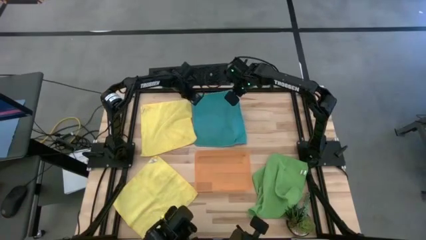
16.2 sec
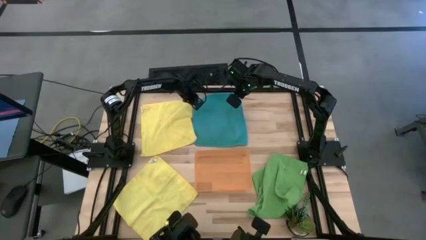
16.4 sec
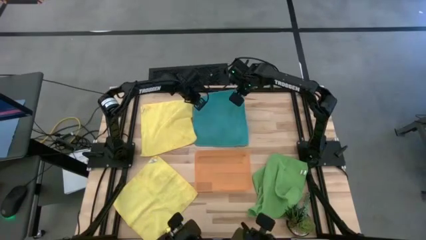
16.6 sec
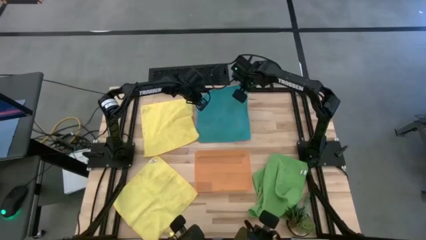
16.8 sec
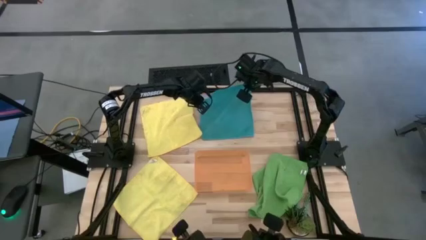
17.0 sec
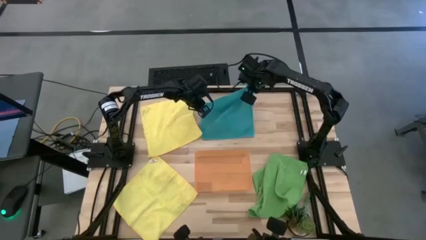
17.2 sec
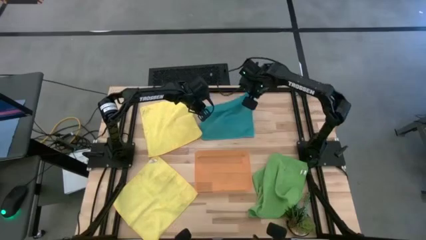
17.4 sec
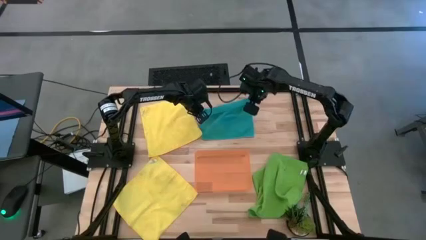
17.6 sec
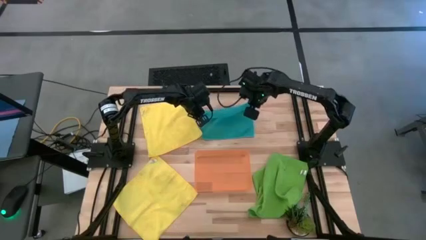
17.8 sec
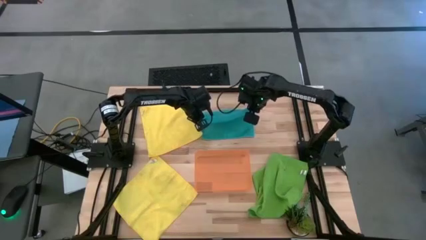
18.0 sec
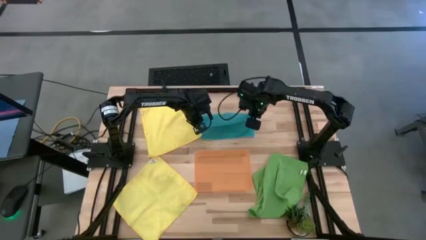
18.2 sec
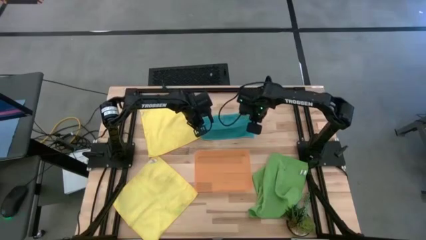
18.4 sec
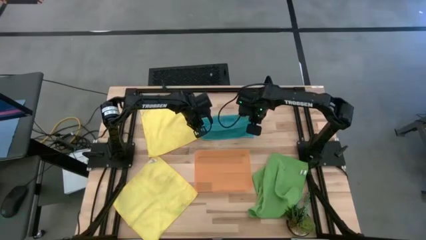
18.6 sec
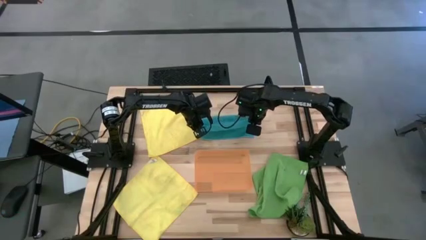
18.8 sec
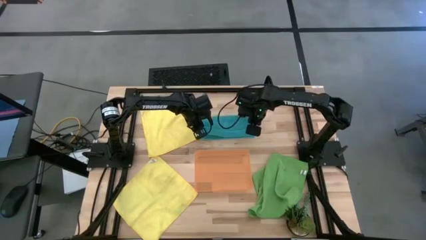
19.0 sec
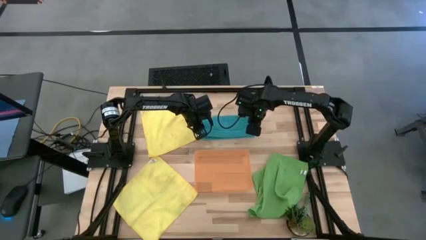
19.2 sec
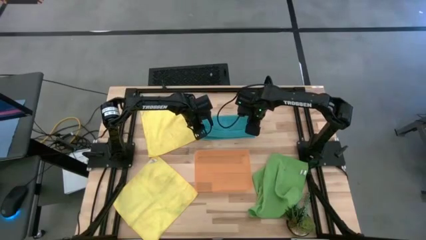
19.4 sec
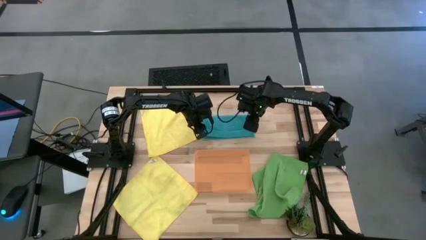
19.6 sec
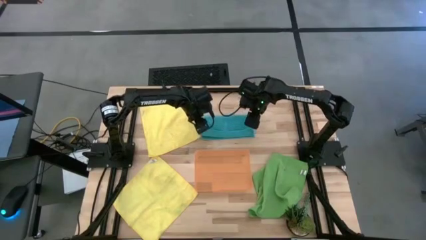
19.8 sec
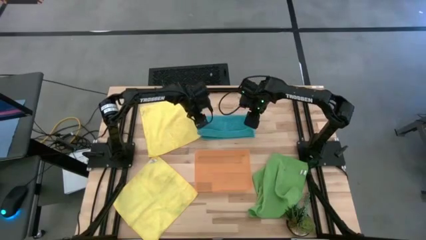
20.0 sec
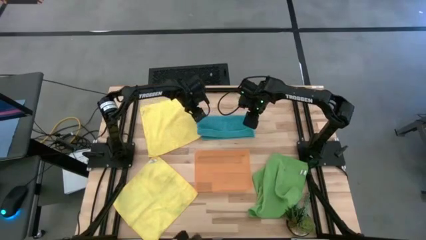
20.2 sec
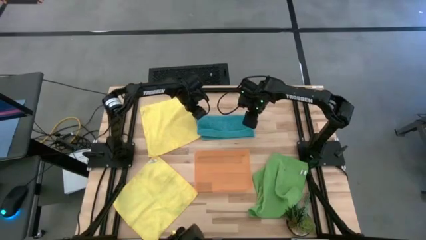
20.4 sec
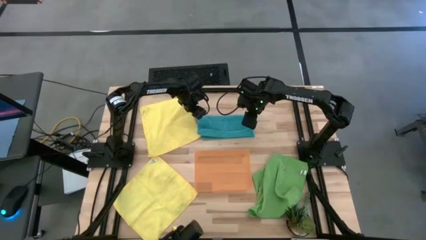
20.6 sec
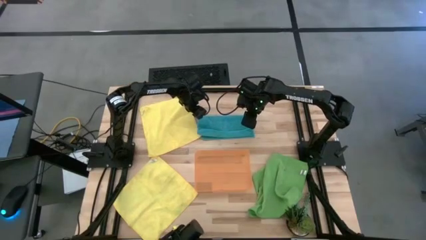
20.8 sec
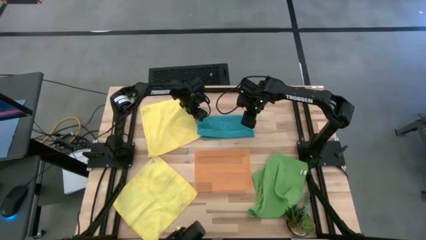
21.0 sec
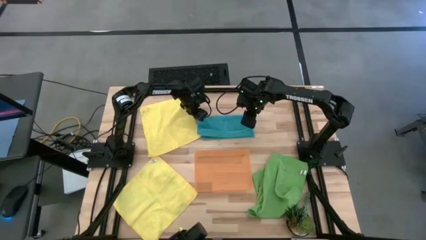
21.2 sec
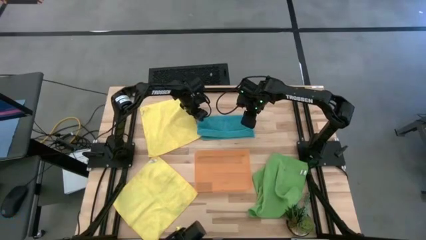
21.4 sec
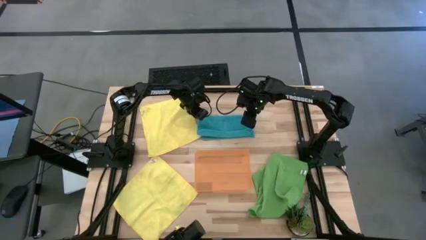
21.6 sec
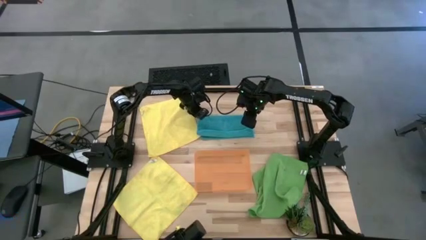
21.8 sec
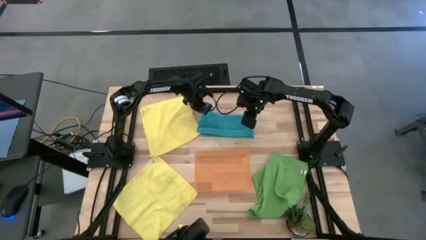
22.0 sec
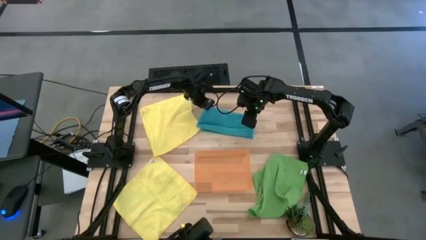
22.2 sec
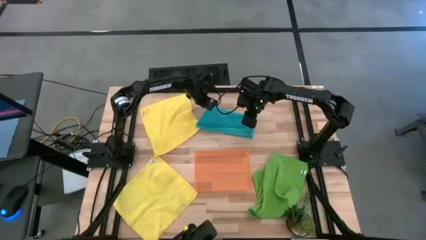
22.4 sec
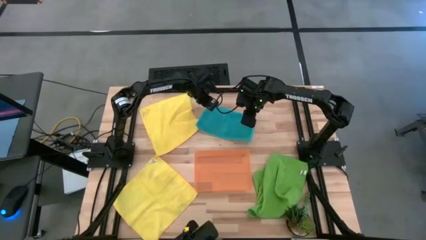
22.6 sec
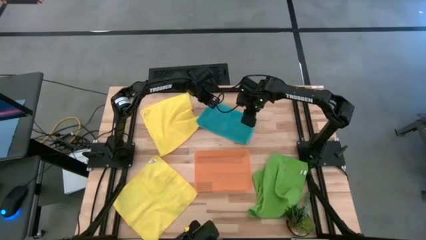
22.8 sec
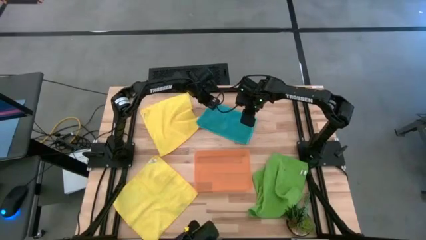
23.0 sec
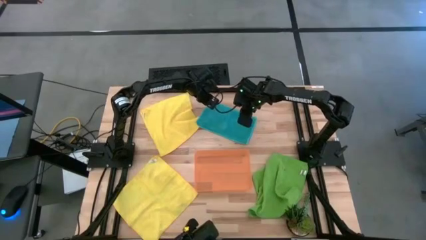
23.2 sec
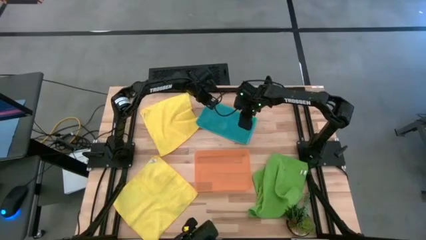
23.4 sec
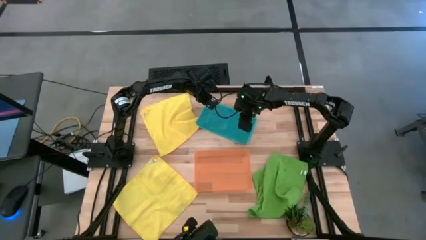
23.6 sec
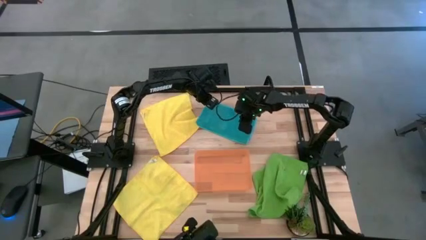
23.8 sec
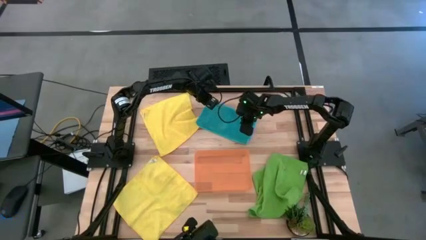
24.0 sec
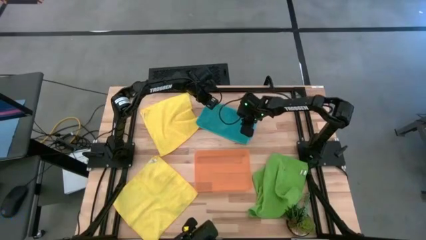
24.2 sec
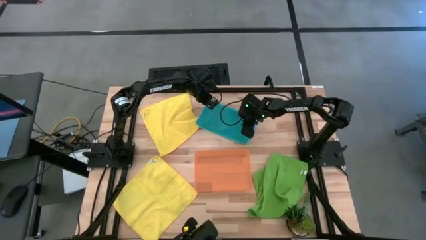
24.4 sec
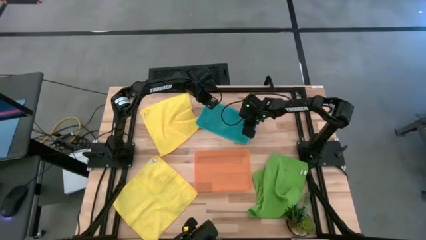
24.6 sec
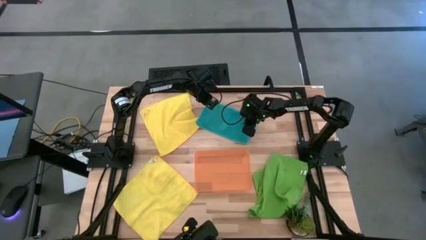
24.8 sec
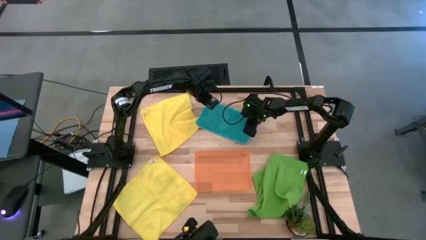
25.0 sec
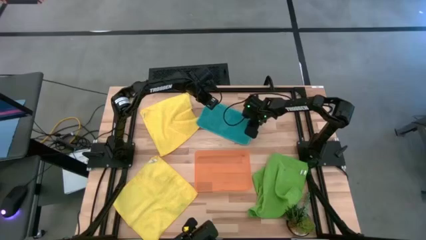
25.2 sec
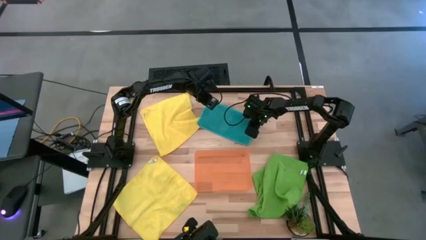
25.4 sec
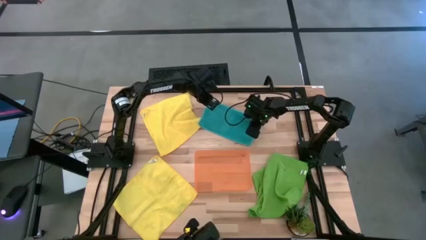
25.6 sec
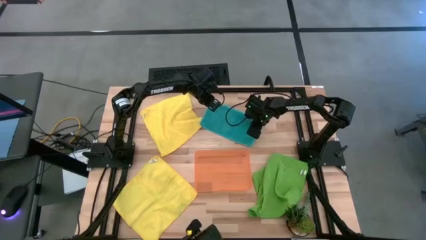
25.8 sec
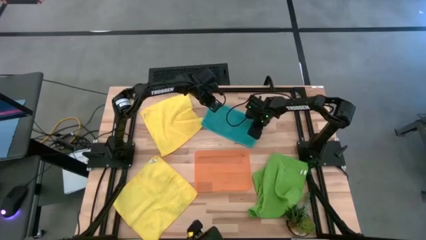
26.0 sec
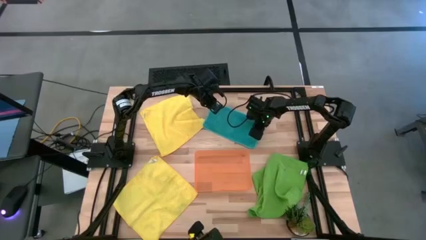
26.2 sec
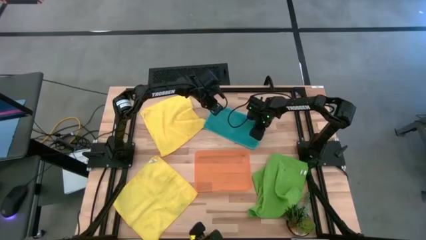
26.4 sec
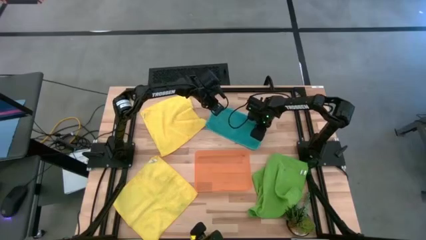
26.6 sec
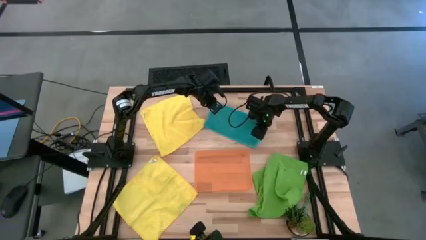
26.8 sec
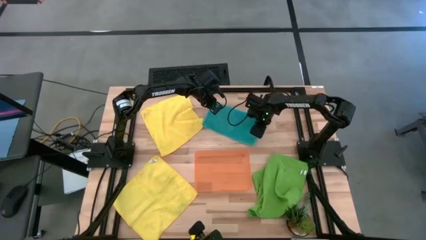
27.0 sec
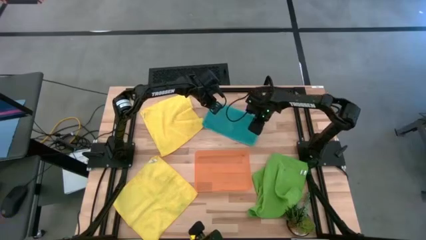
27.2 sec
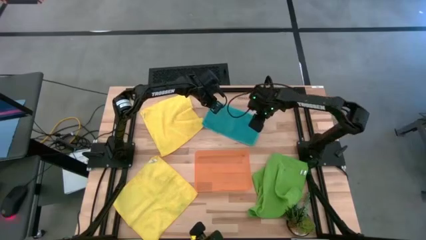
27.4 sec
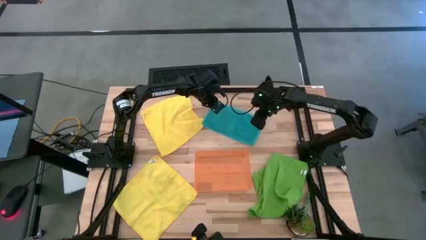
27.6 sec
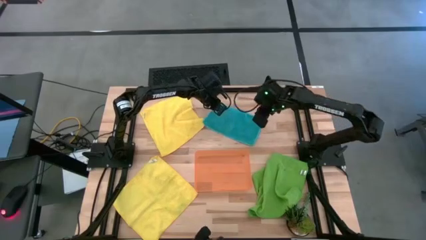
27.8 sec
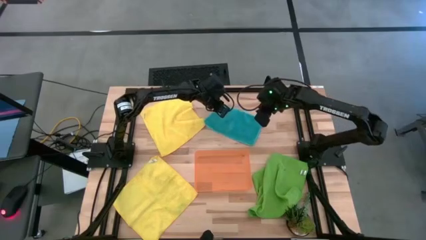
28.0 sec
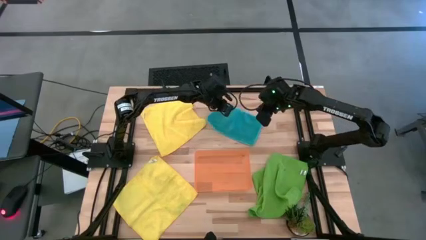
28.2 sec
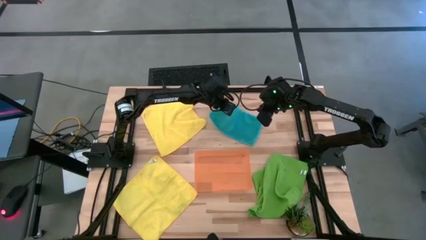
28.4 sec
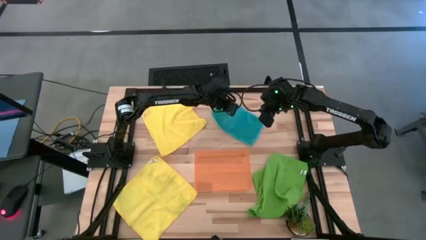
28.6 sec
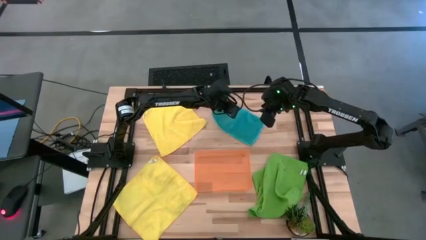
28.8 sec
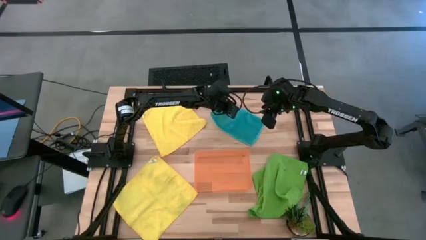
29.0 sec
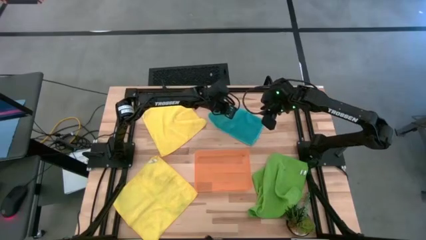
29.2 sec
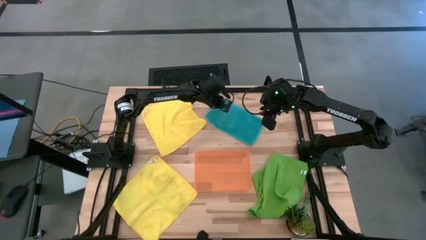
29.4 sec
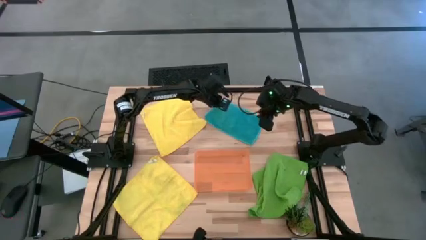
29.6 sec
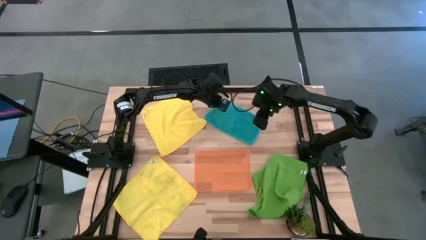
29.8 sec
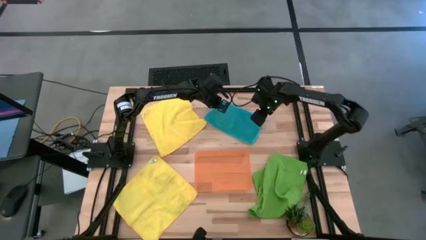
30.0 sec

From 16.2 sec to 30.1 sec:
Task: Fold microfiber towels
Fold the blue towel
